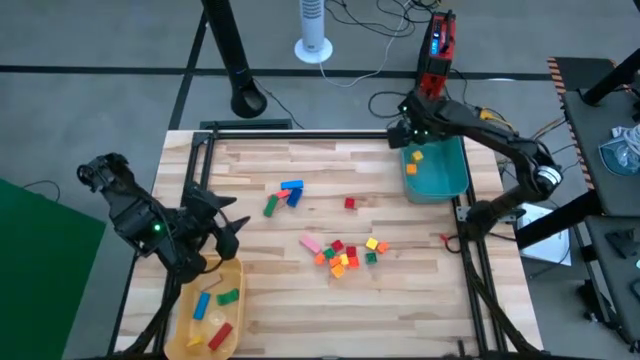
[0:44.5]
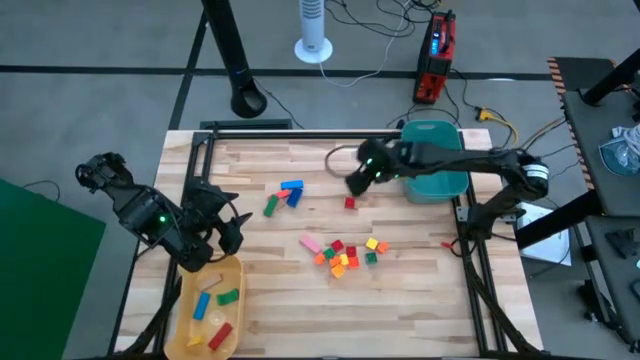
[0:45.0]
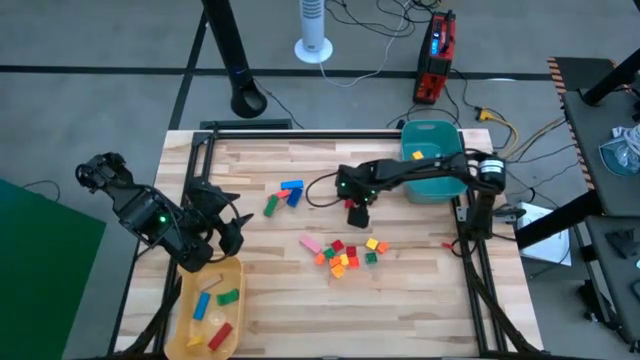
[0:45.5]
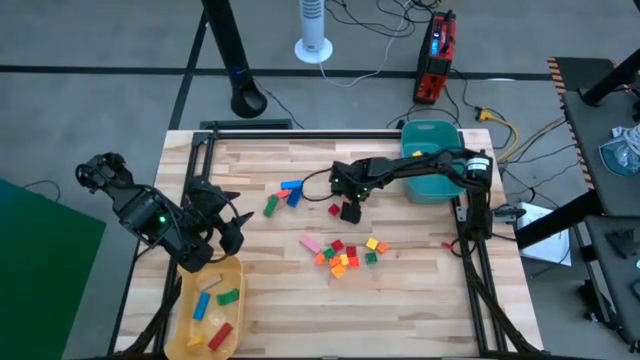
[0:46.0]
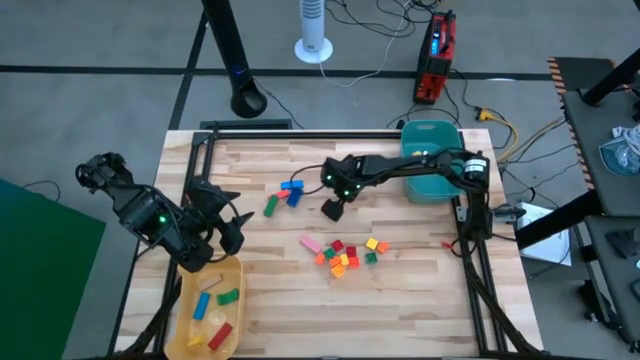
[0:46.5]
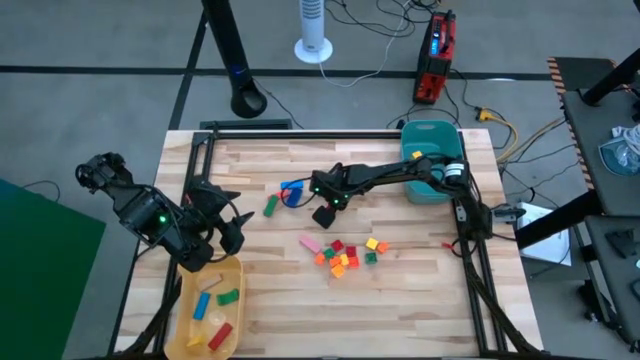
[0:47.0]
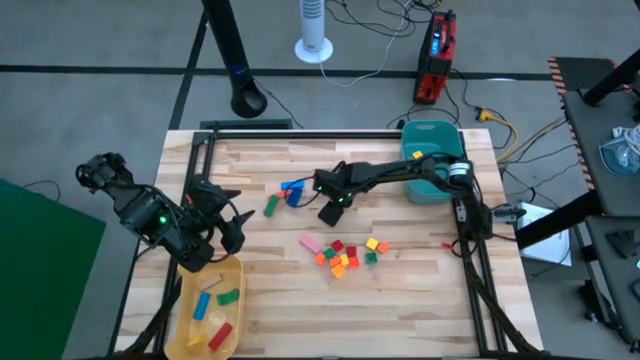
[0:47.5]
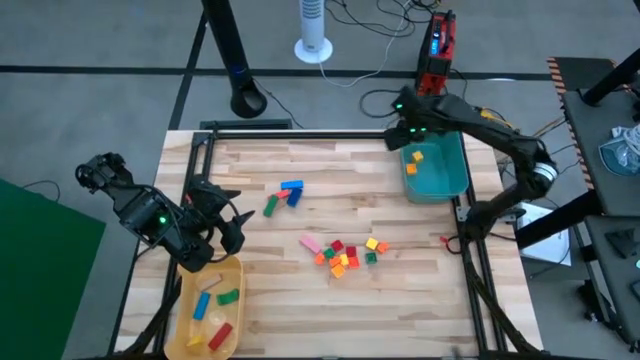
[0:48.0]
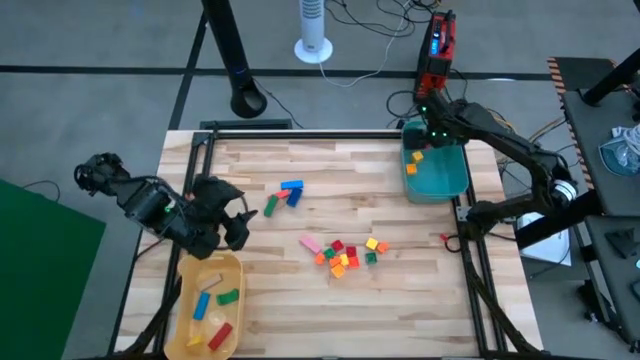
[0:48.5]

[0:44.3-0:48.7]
Task: Sort blocks
Put the red 4-stud game piece into the green bin

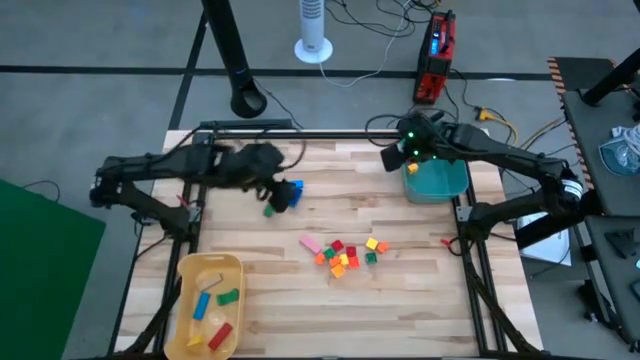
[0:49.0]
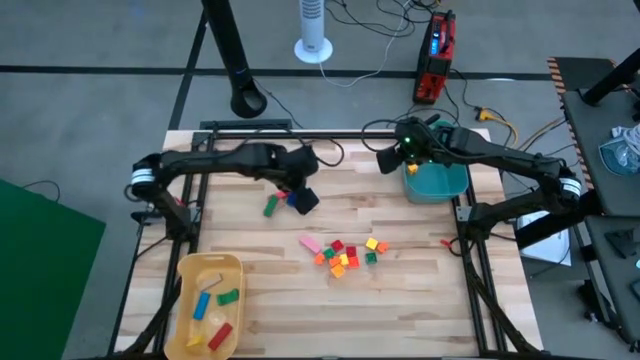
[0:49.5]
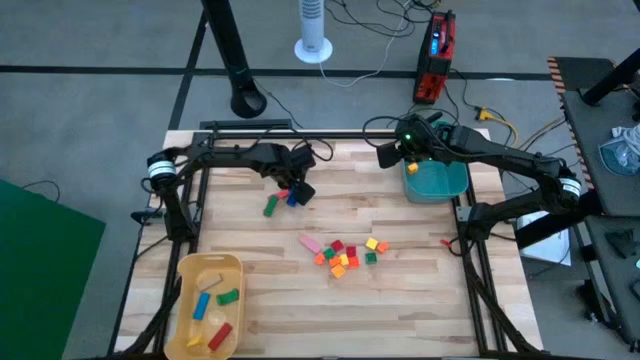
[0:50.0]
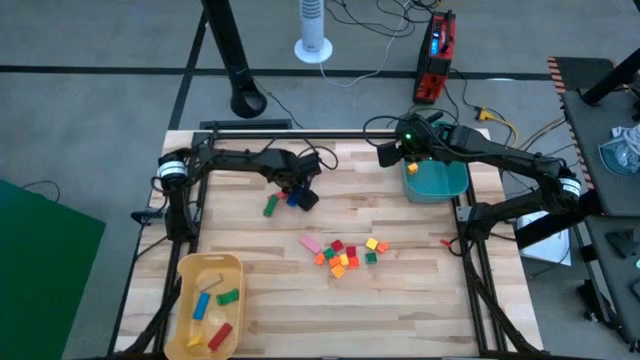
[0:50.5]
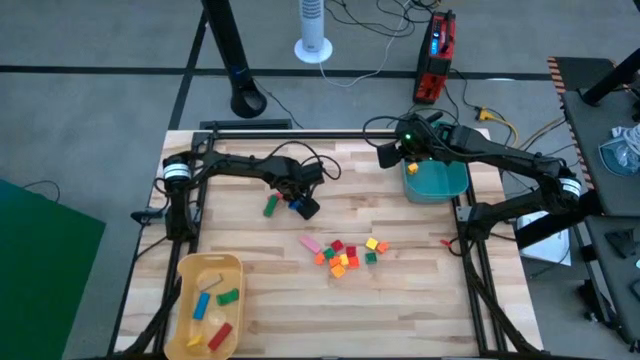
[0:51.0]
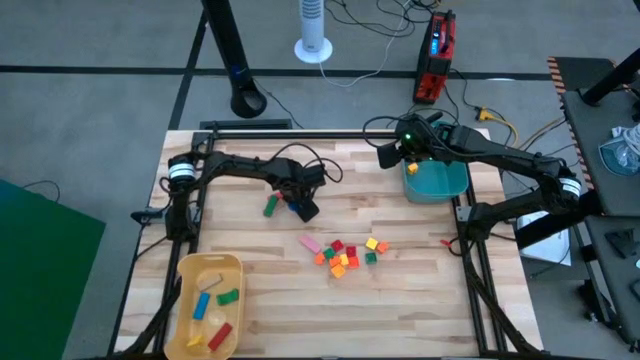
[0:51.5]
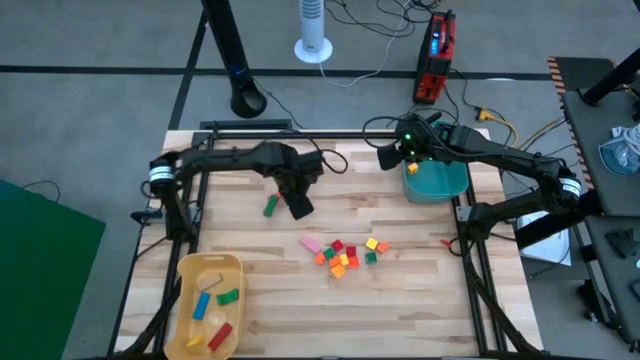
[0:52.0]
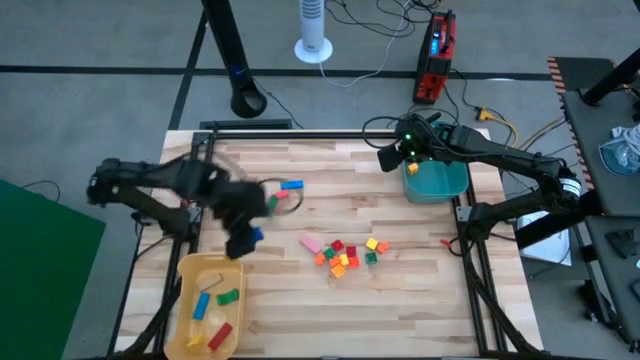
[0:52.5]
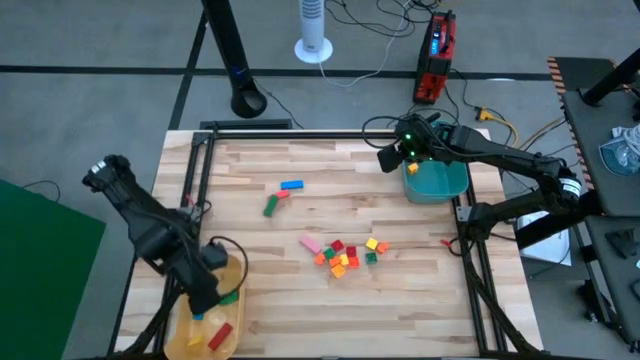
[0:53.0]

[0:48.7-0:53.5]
Put the blue 8-stud game piece into the yellow bin

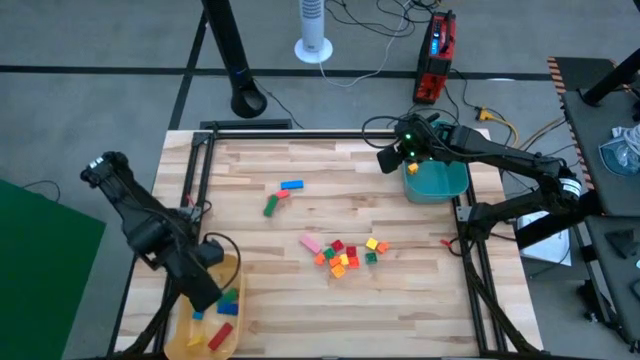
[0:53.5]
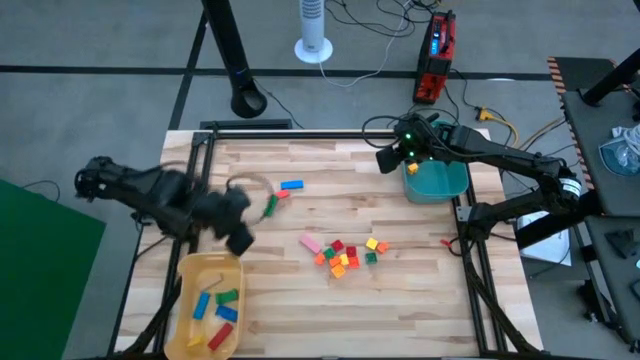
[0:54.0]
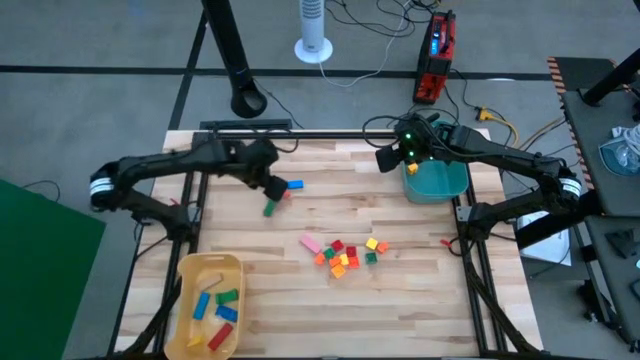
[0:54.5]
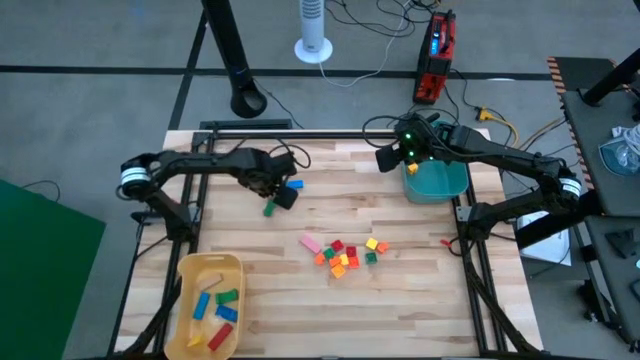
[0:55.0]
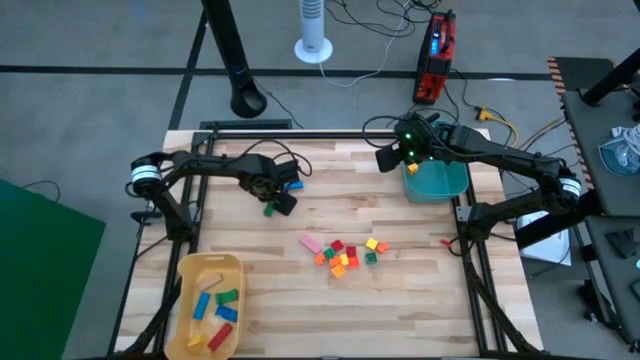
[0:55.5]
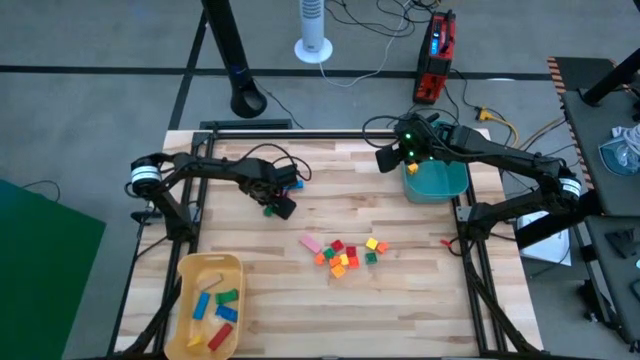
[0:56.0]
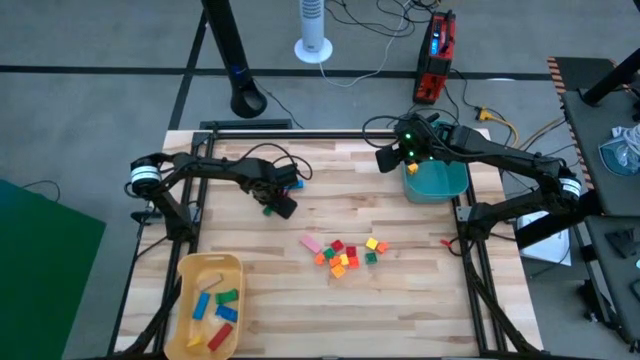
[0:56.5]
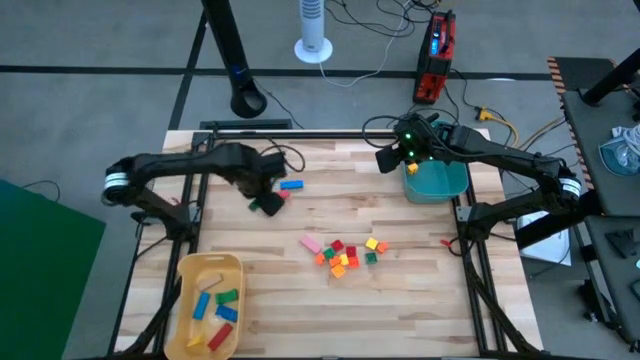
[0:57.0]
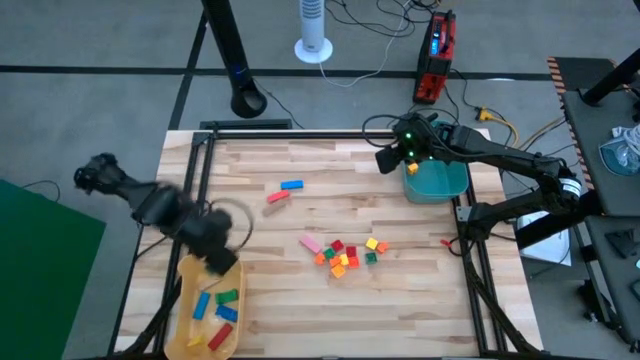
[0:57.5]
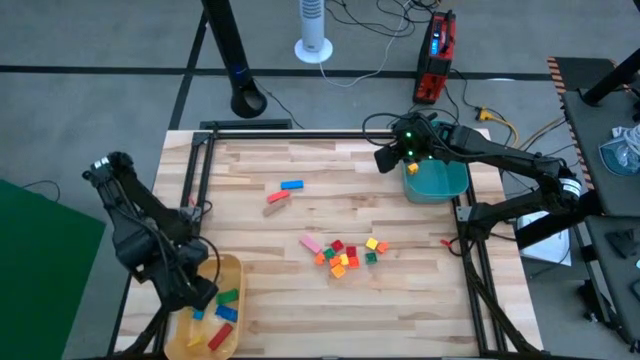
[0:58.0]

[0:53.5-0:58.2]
Put the green rectangular block into the yellow bin

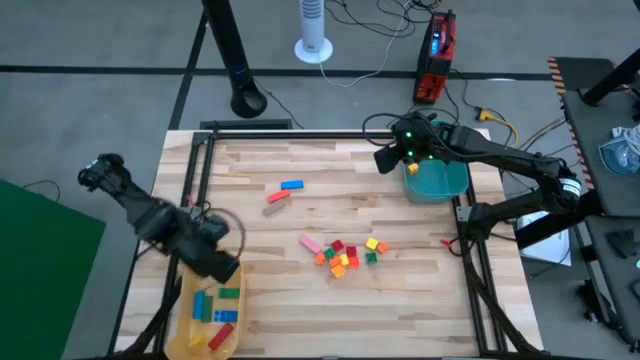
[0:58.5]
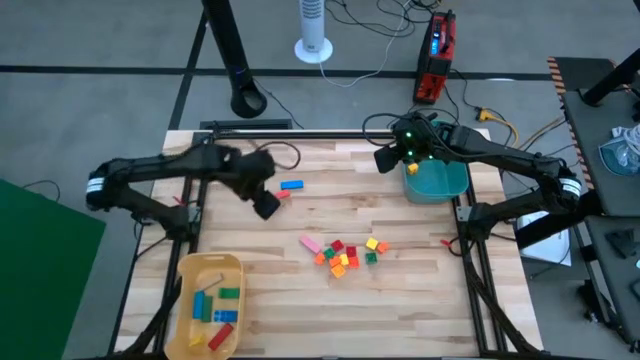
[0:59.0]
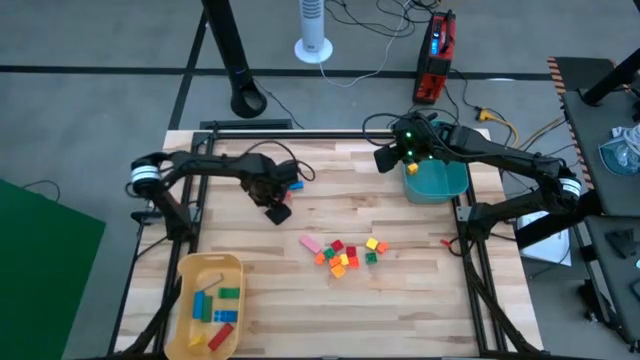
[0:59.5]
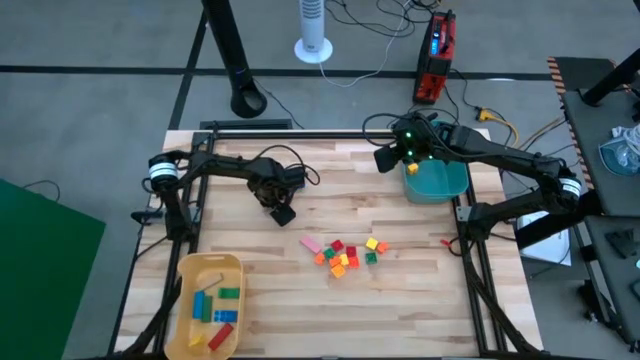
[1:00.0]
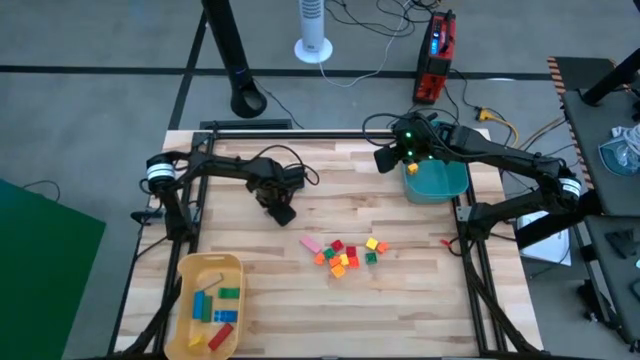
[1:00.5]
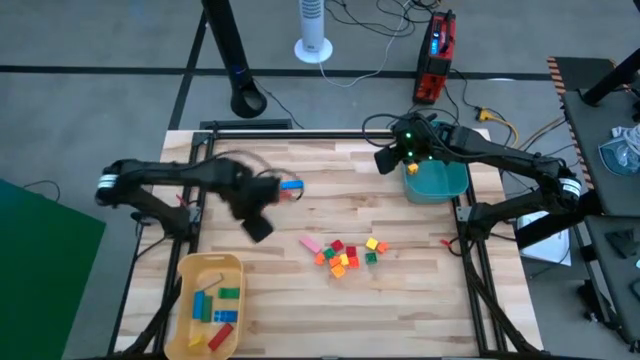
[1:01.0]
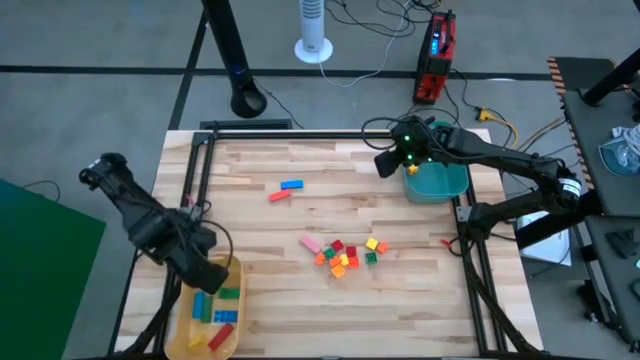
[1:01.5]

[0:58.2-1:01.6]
Put the brown rectangular block into the yellow bin

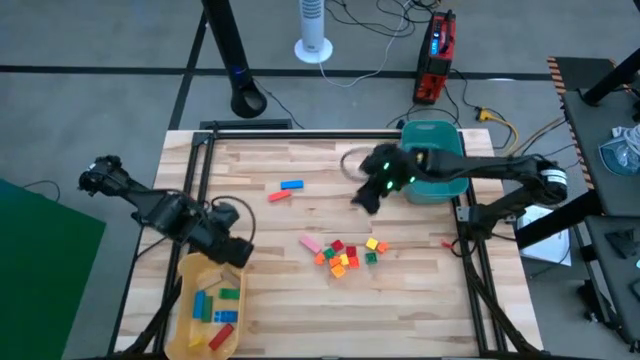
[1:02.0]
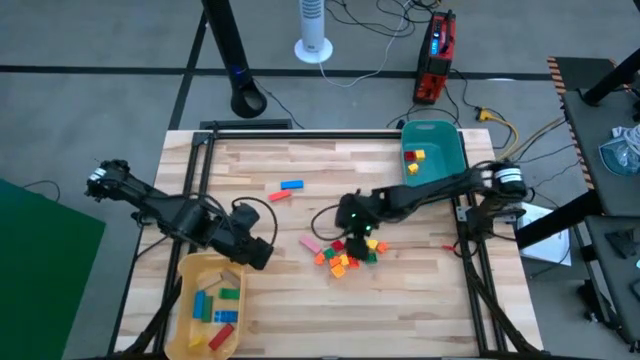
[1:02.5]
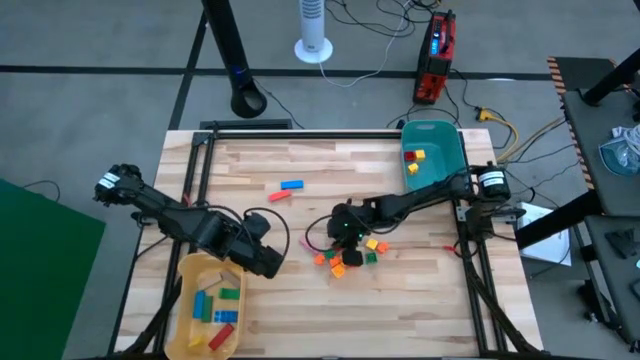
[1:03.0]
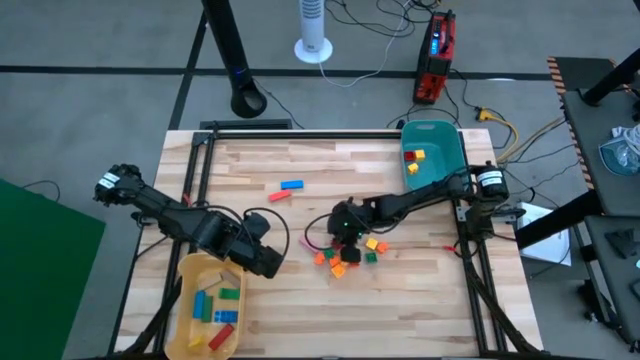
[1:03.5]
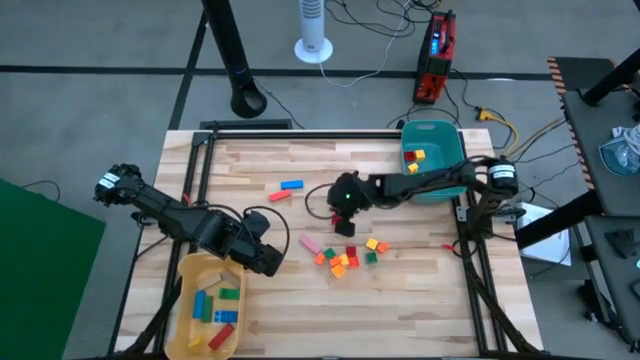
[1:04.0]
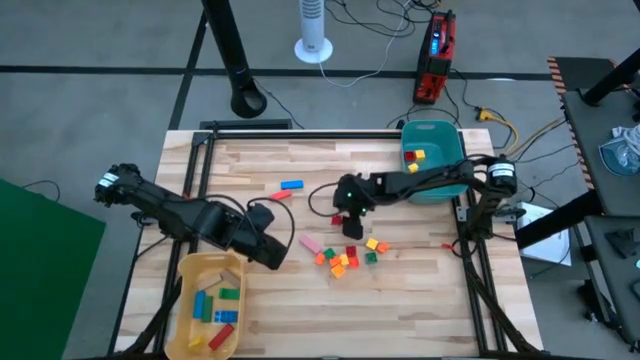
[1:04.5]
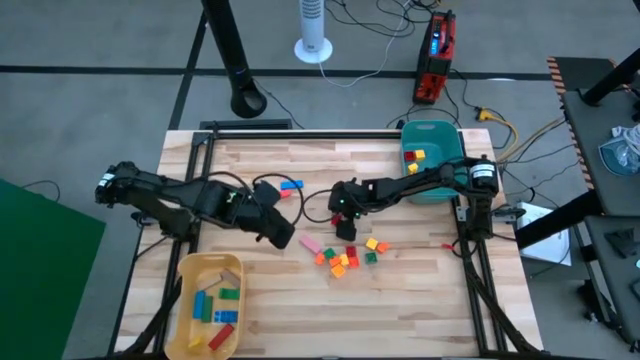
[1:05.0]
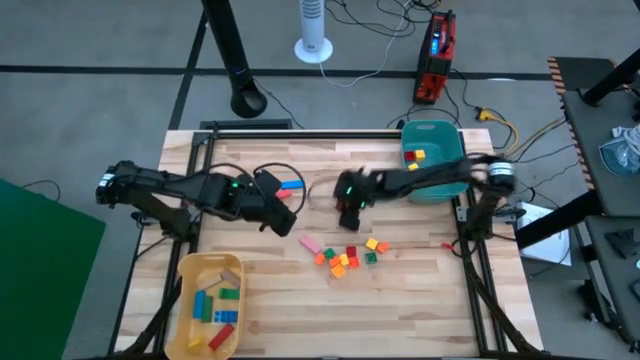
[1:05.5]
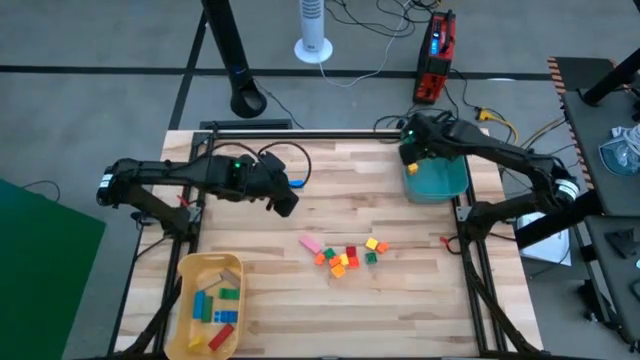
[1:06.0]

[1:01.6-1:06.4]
Put the red 4-stud game piece into the green bin
